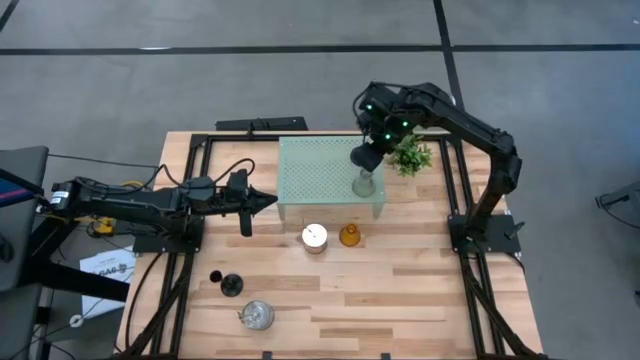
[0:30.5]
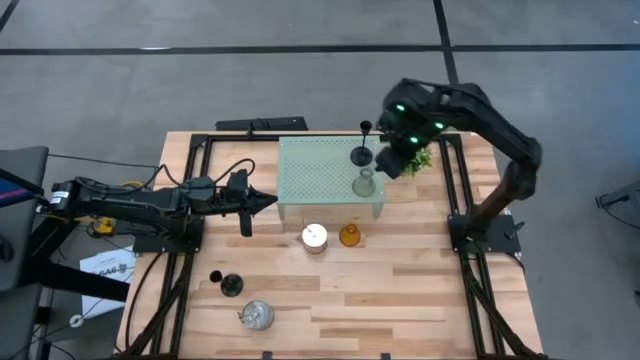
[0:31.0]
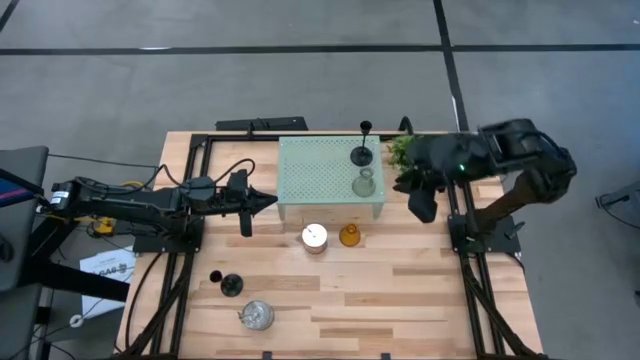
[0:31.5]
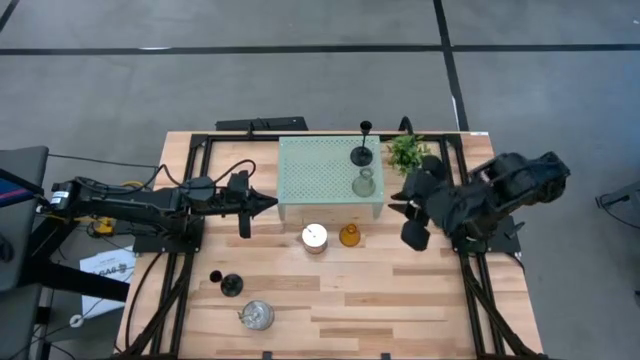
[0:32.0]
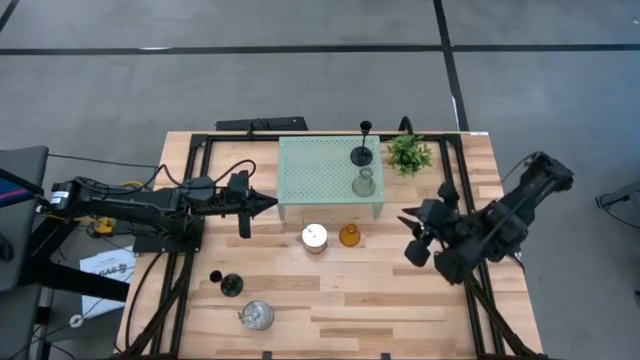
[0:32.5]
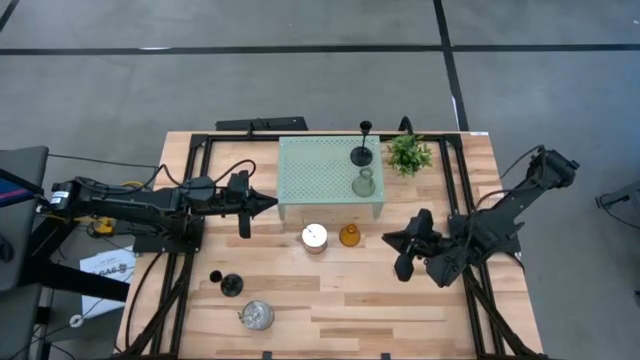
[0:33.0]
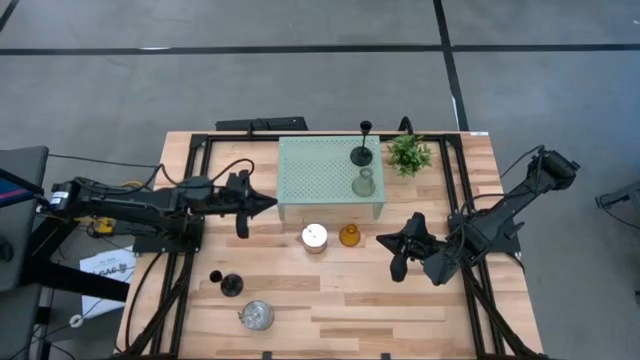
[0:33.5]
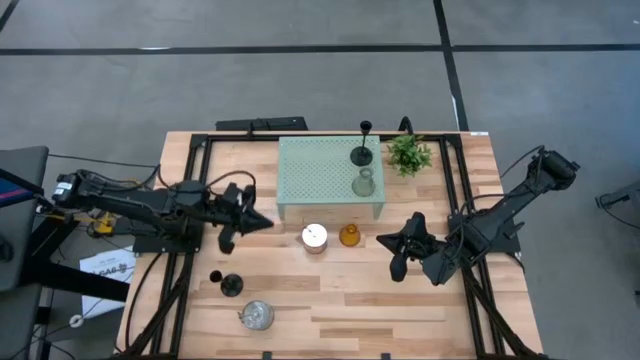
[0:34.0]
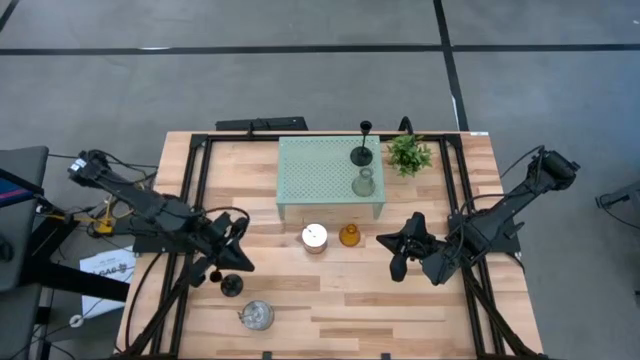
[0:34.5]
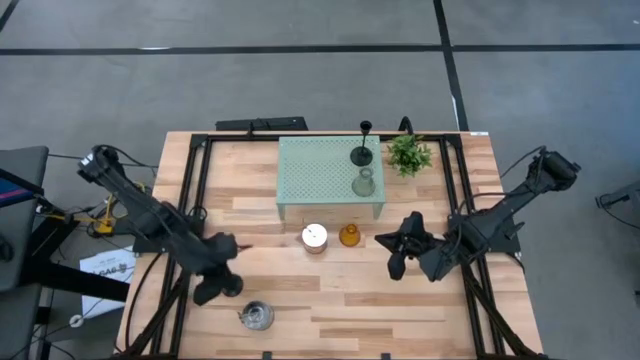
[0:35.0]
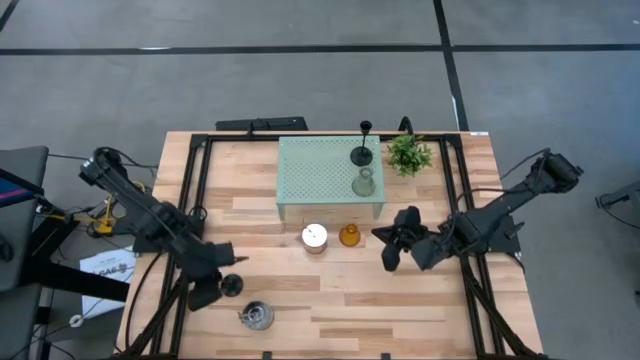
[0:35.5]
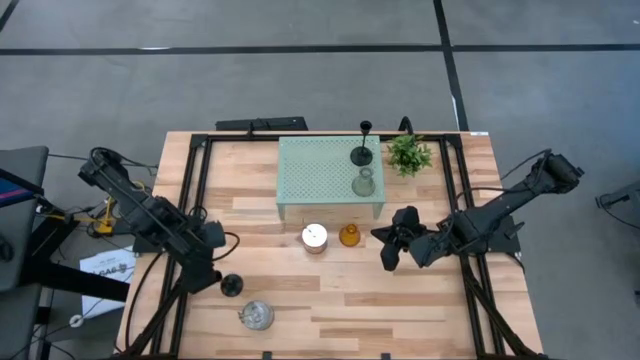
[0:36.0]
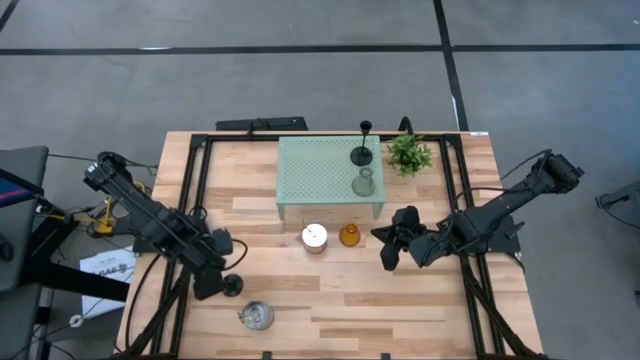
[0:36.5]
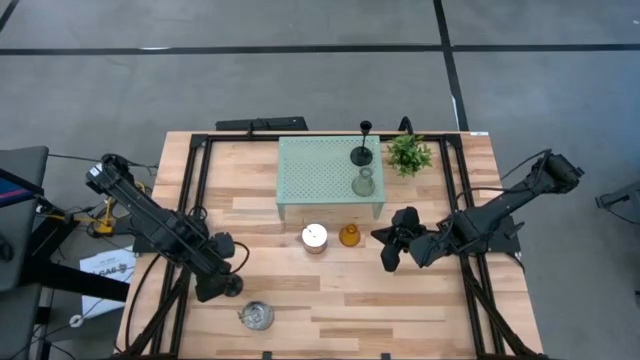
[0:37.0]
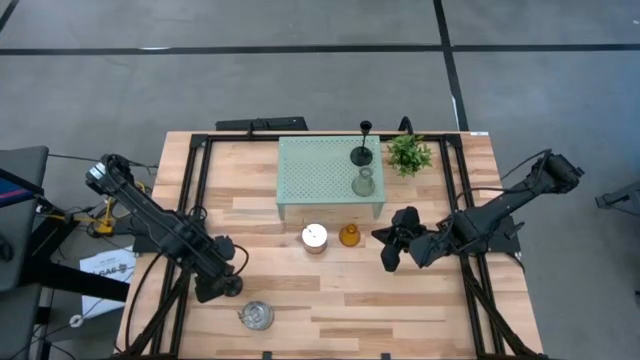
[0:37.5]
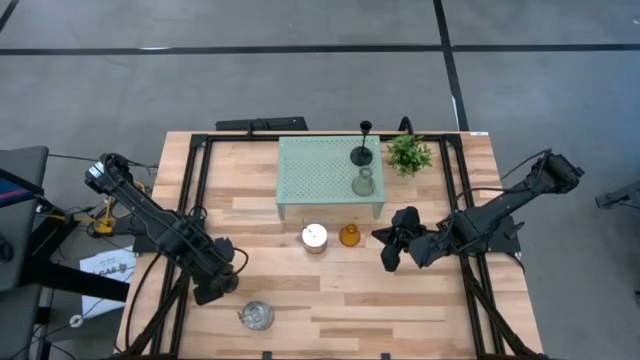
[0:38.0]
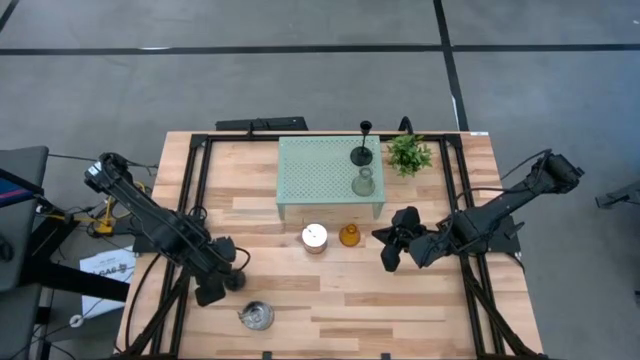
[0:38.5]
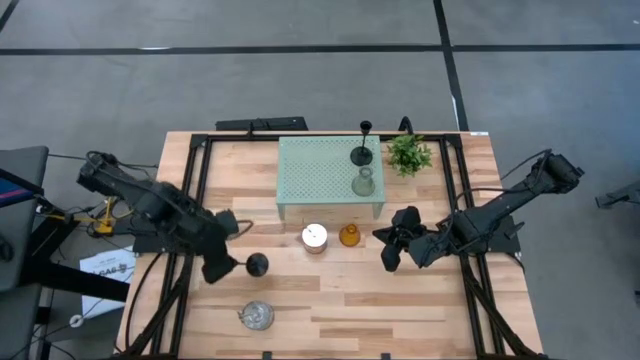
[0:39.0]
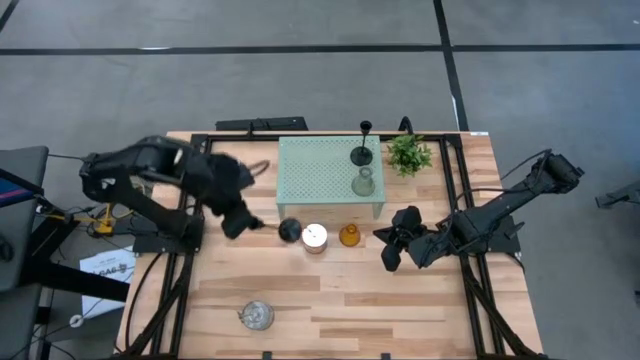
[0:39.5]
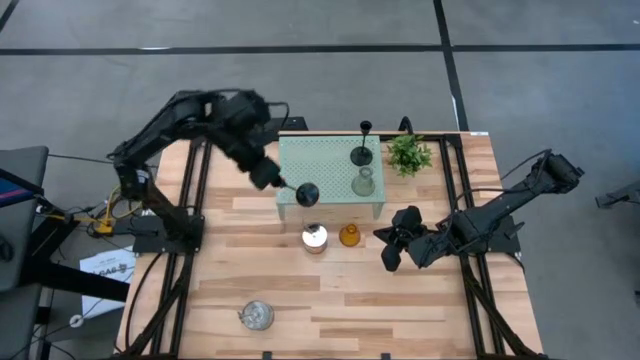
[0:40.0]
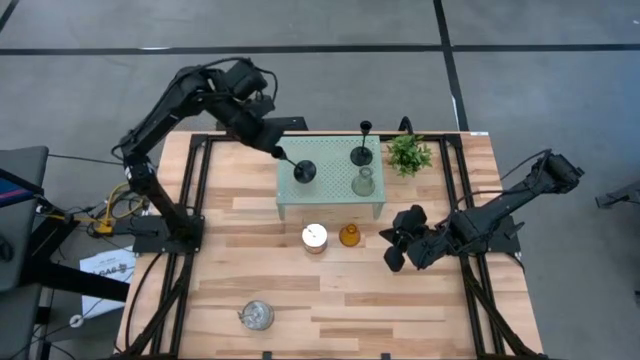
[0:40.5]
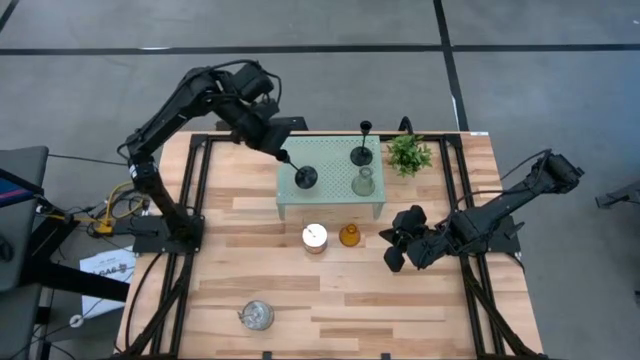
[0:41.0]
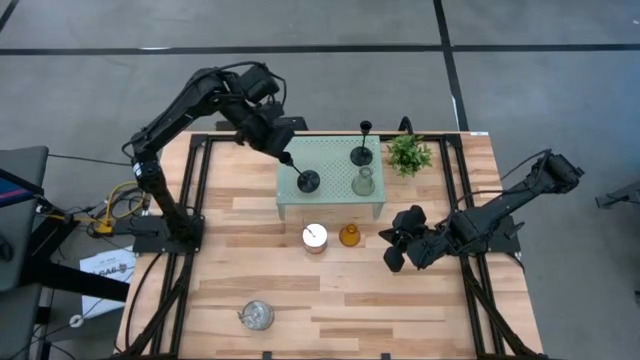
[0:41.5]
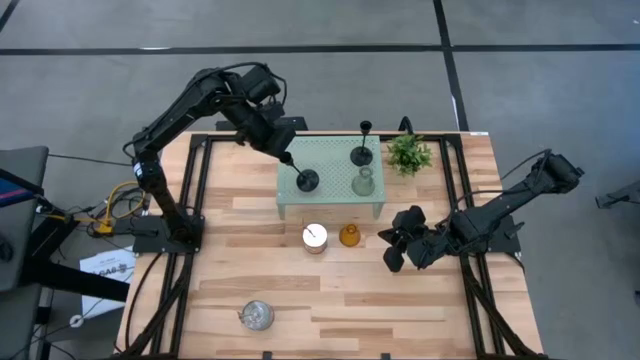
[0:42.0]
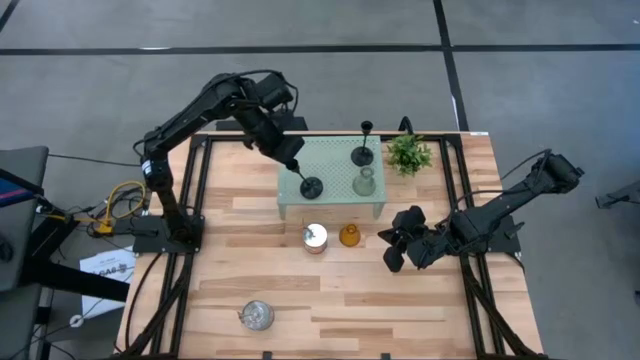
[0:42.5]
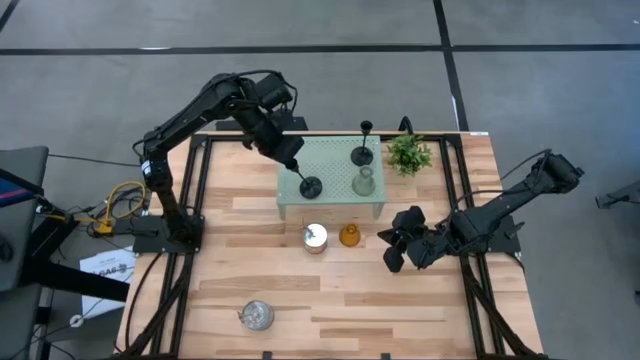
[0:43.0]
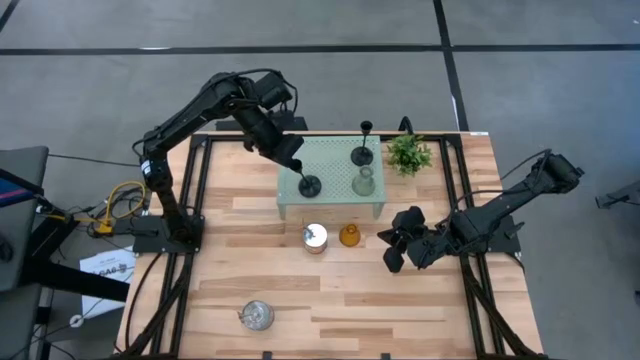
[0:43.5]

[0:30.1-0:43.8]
Task: Pick & Place candle stick holders
Put the black candle holder on the shelf

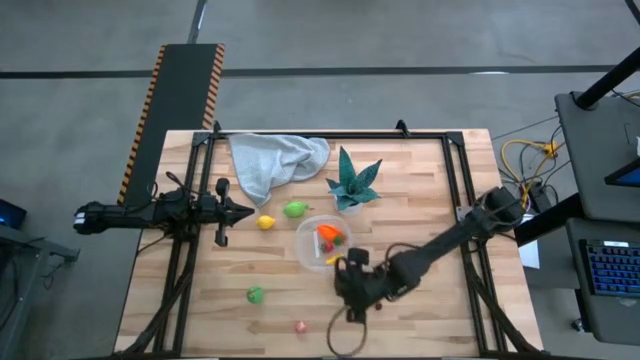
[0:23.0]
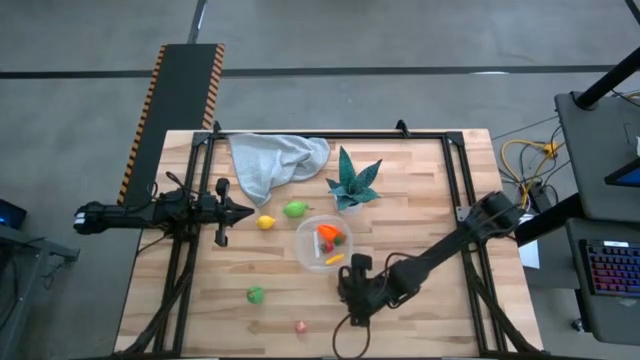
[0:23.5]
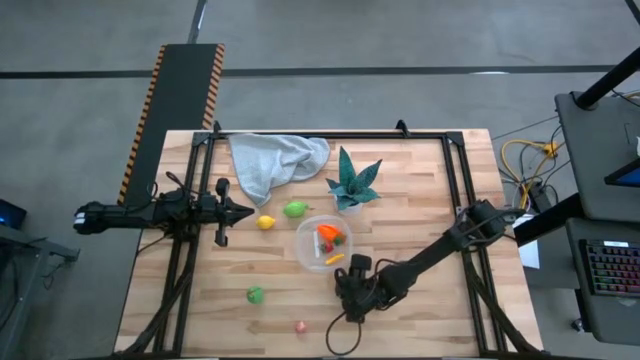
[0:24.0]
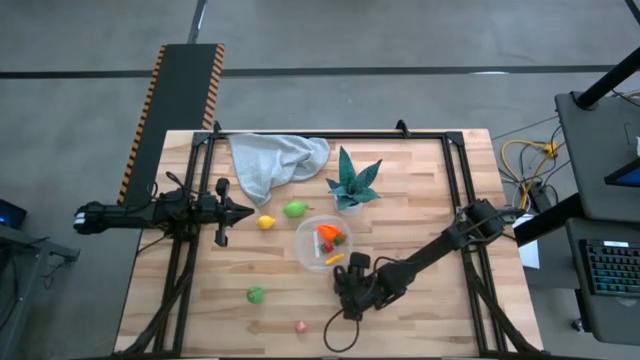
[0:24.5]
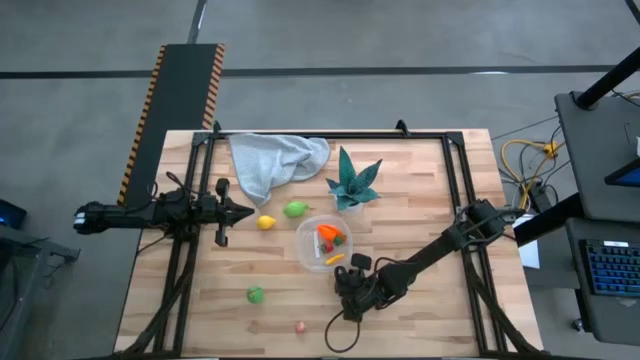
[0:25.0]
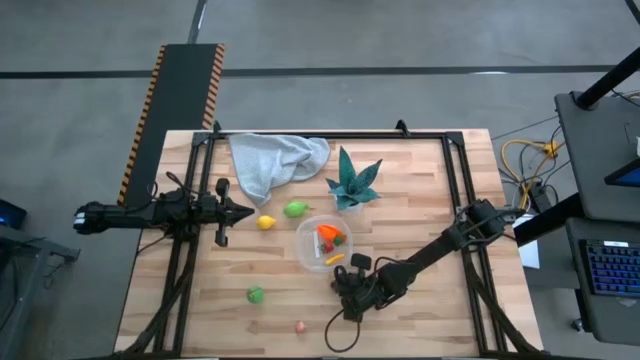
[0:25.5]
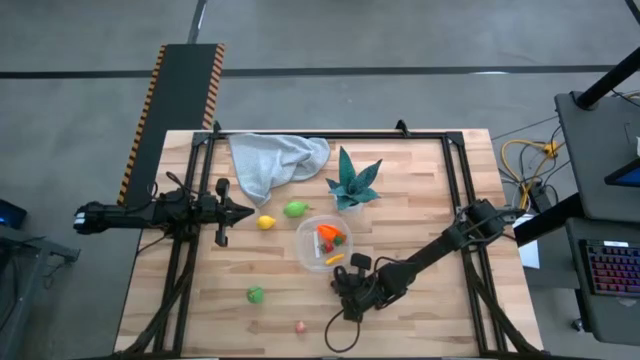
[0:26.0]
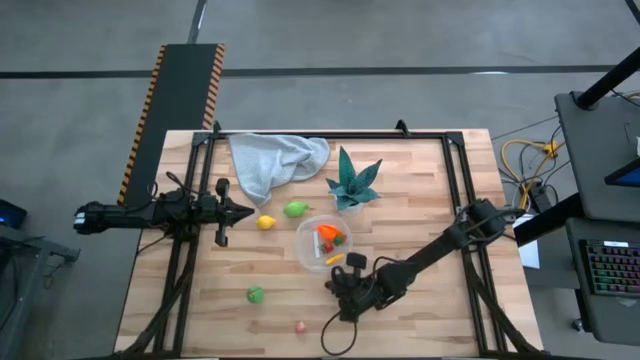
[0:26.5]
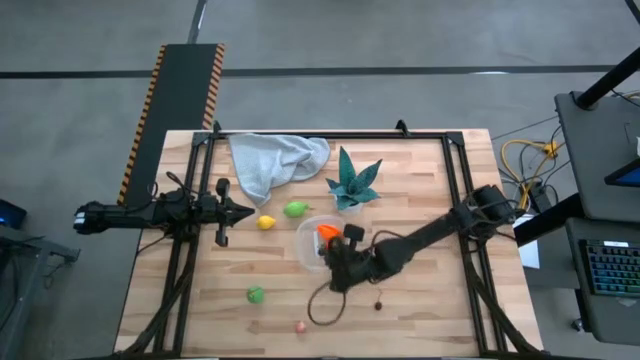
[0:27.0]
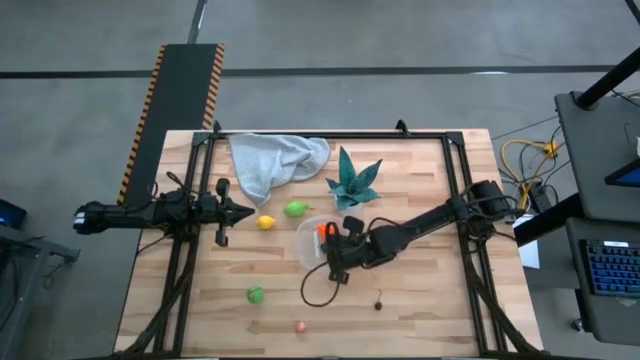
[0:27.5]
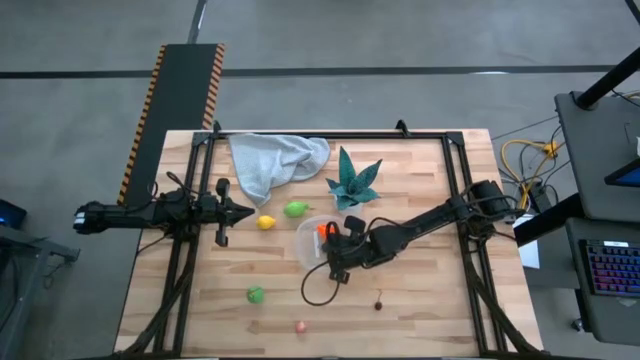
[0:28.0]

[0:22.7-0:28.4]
Task: Pick and placing Produce into tupperware
Put the black cherry into the transparent bin
